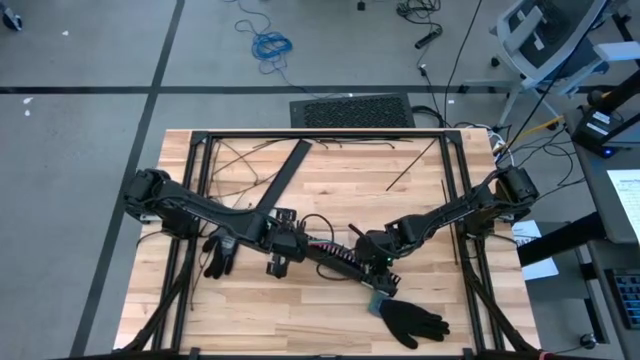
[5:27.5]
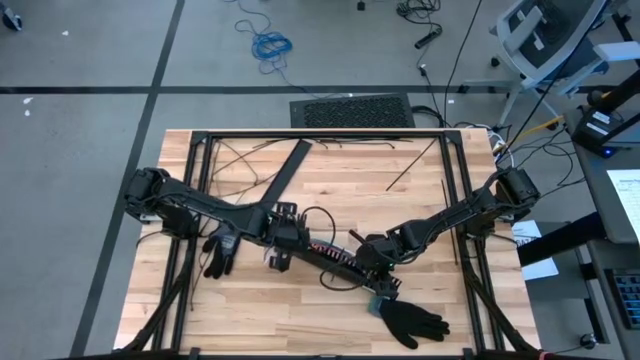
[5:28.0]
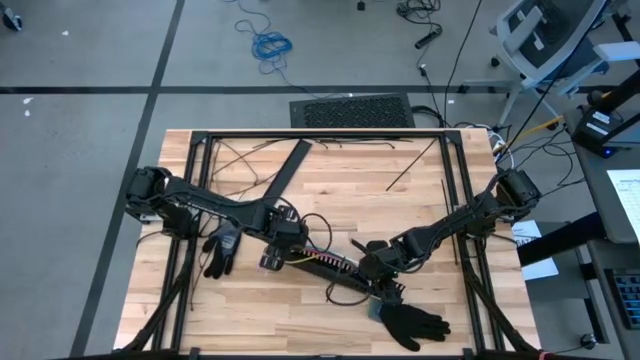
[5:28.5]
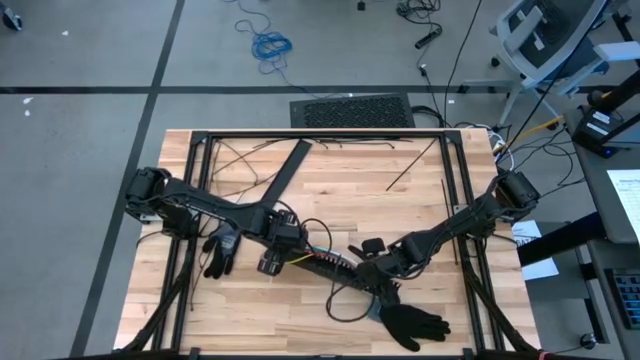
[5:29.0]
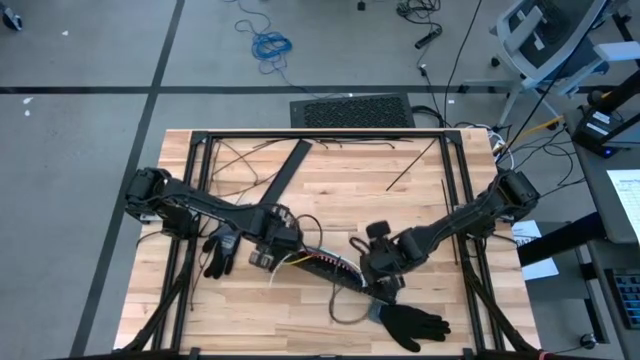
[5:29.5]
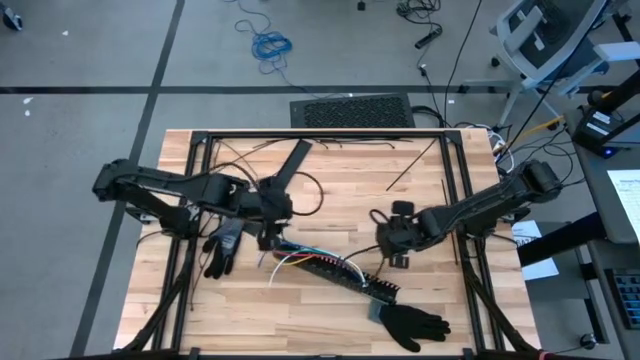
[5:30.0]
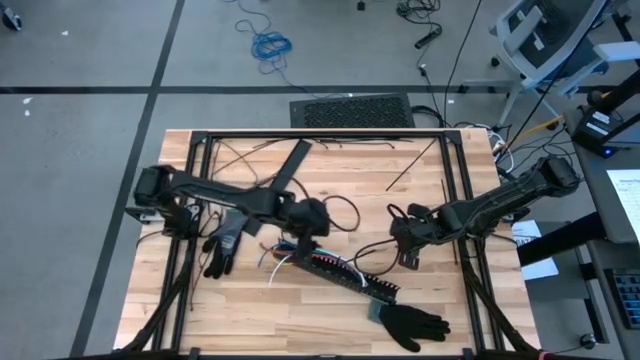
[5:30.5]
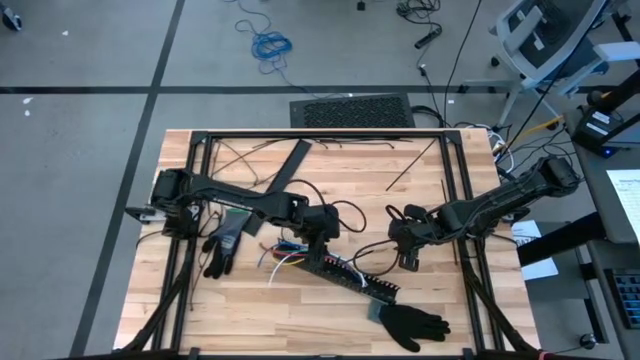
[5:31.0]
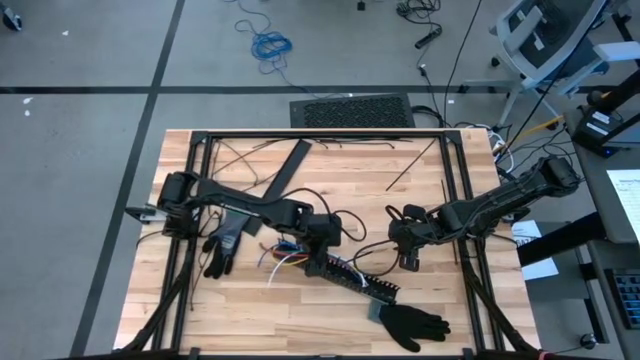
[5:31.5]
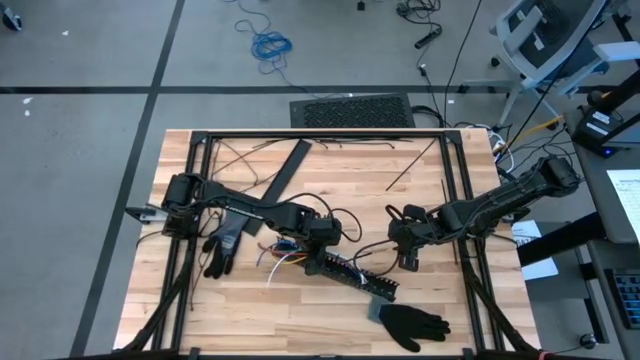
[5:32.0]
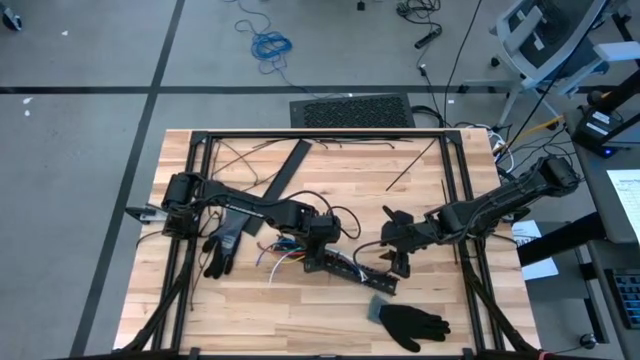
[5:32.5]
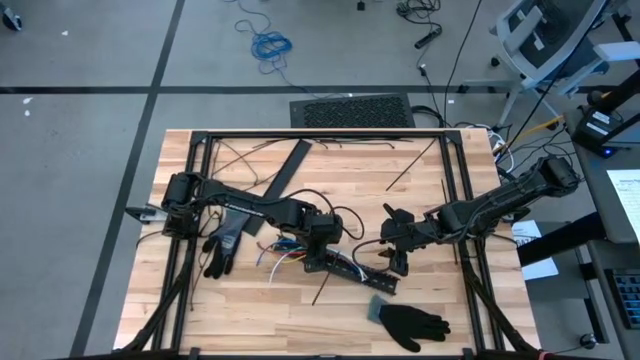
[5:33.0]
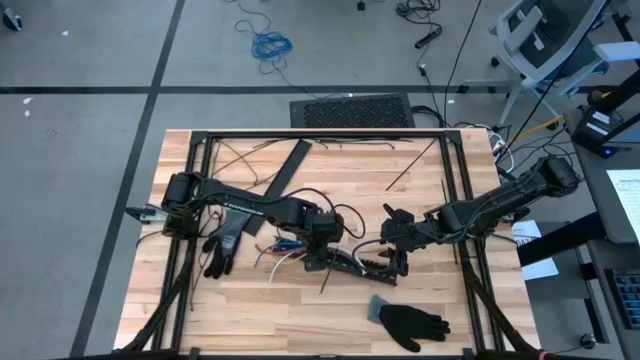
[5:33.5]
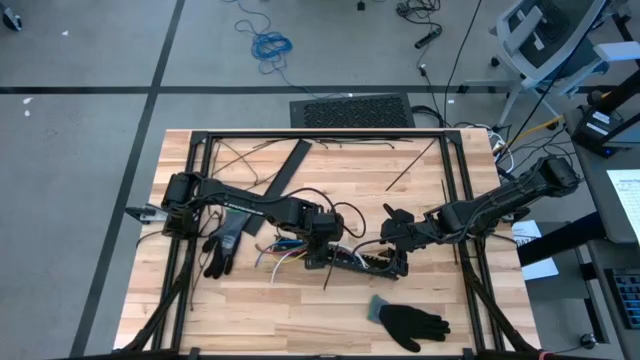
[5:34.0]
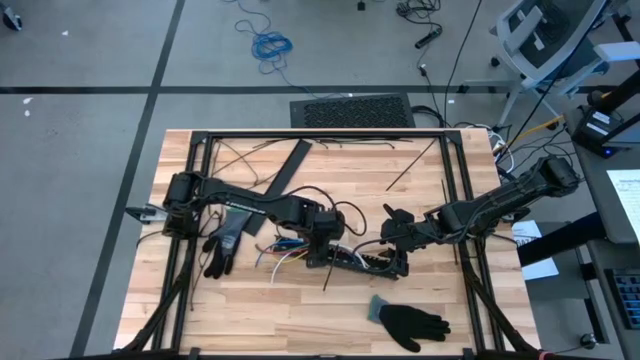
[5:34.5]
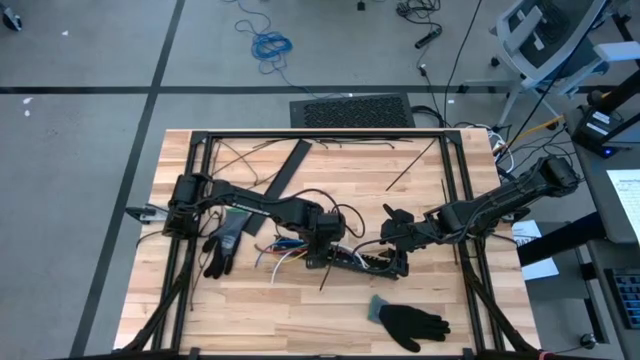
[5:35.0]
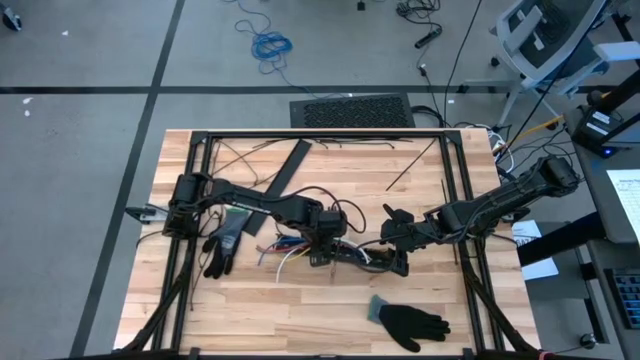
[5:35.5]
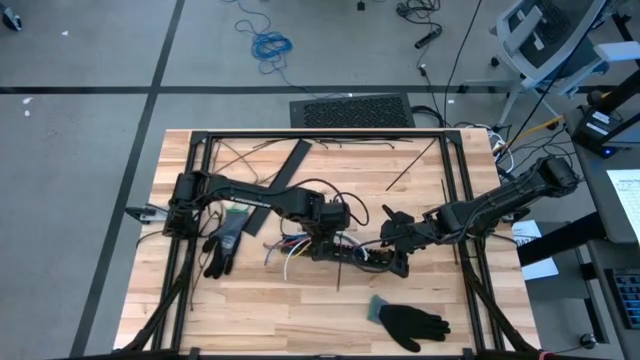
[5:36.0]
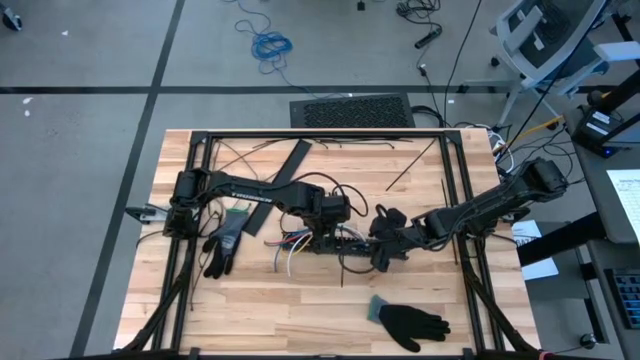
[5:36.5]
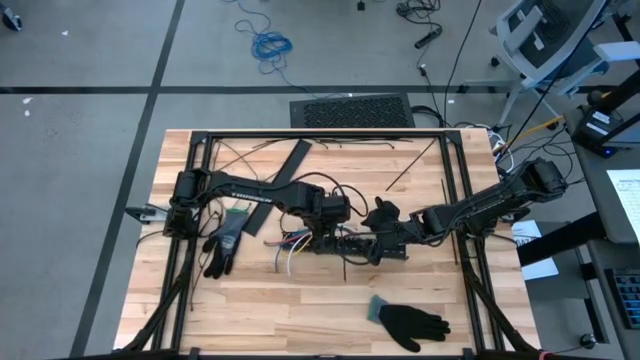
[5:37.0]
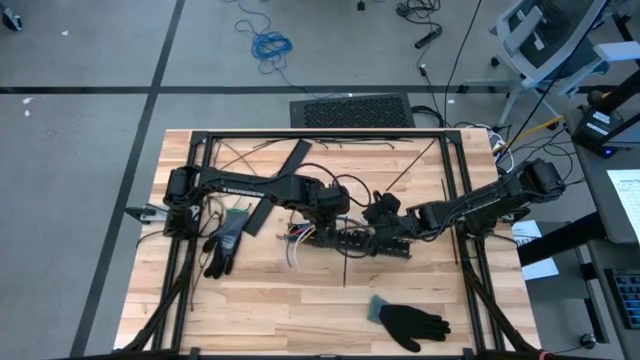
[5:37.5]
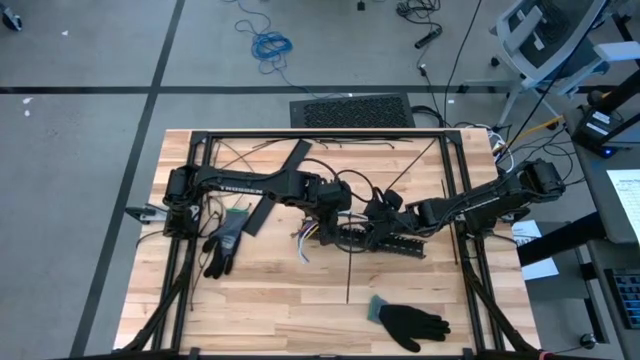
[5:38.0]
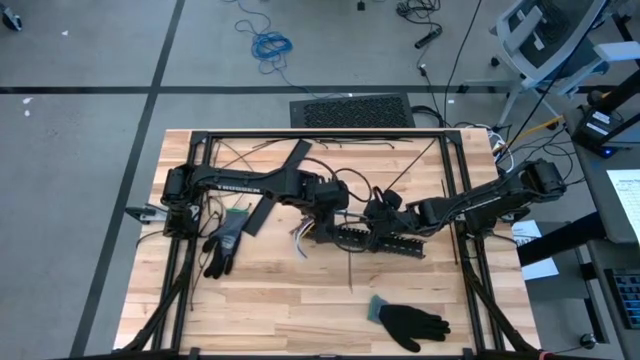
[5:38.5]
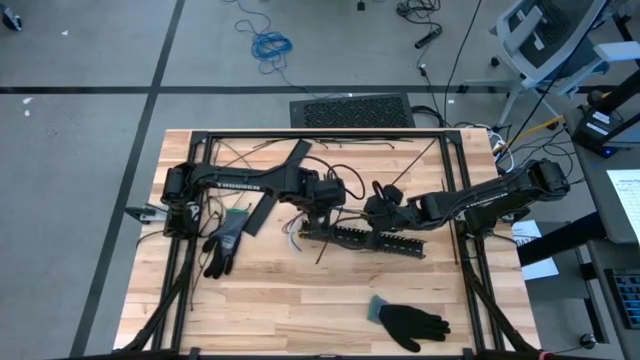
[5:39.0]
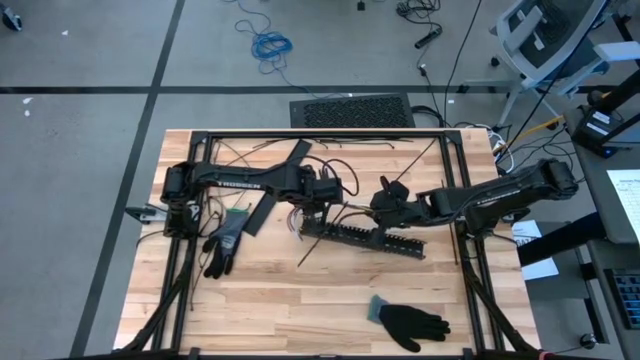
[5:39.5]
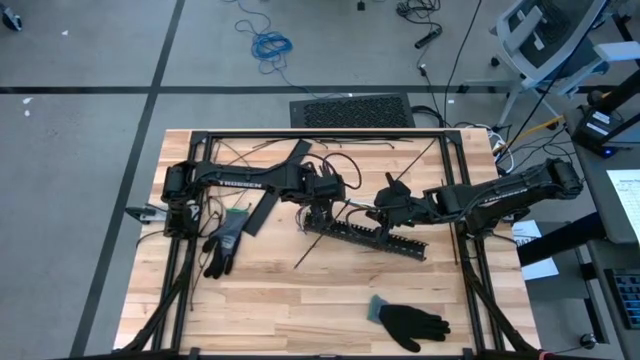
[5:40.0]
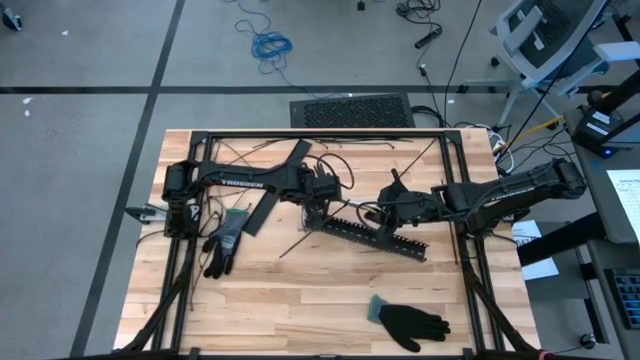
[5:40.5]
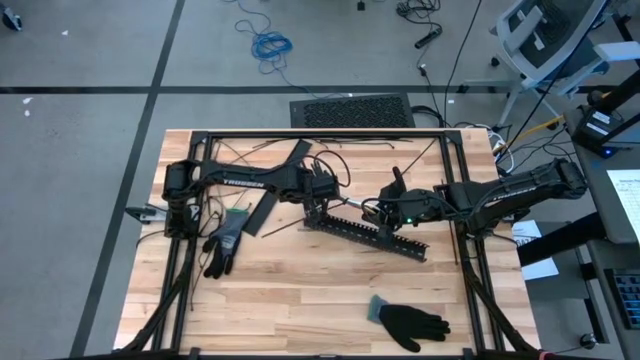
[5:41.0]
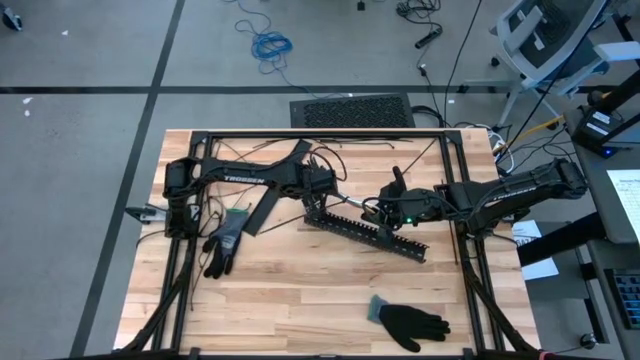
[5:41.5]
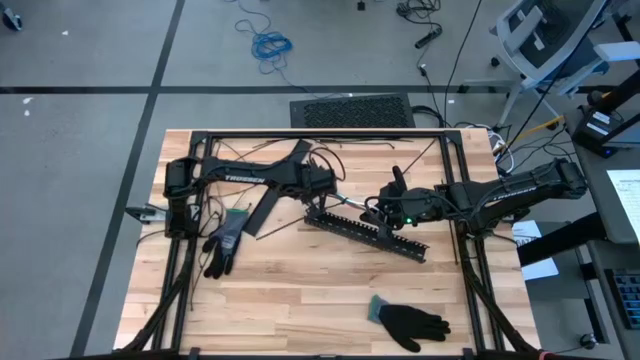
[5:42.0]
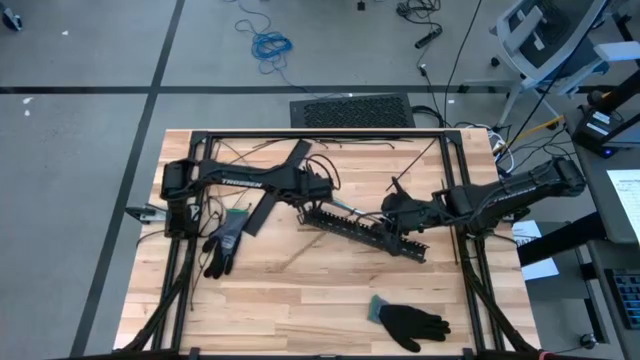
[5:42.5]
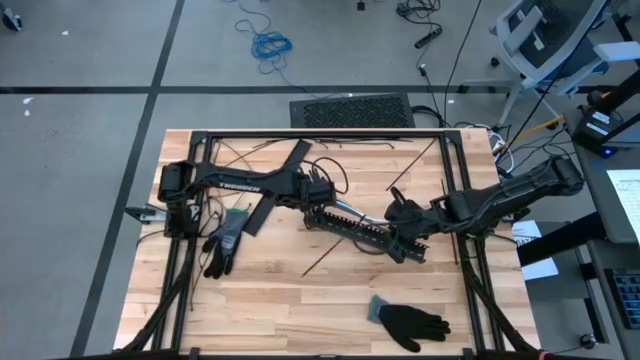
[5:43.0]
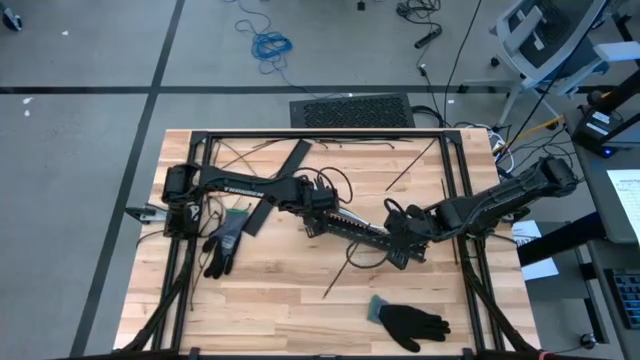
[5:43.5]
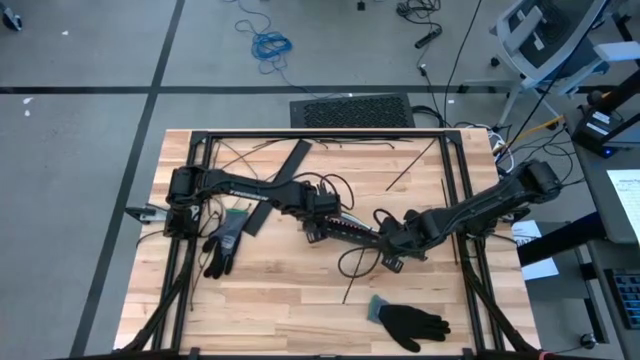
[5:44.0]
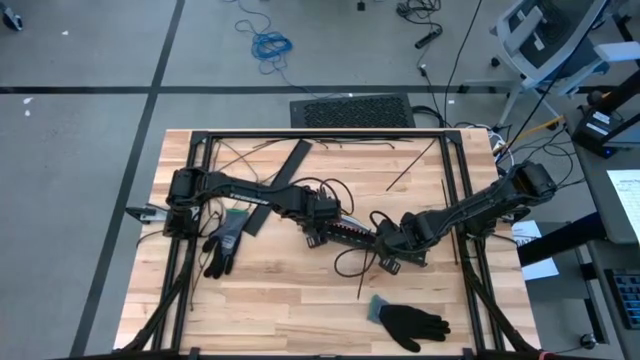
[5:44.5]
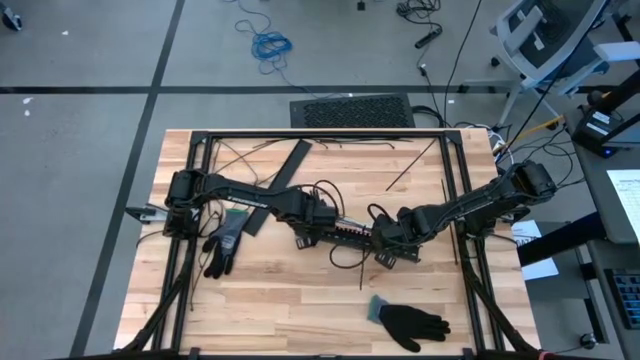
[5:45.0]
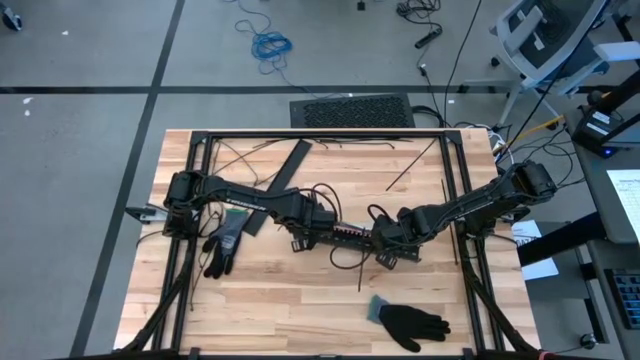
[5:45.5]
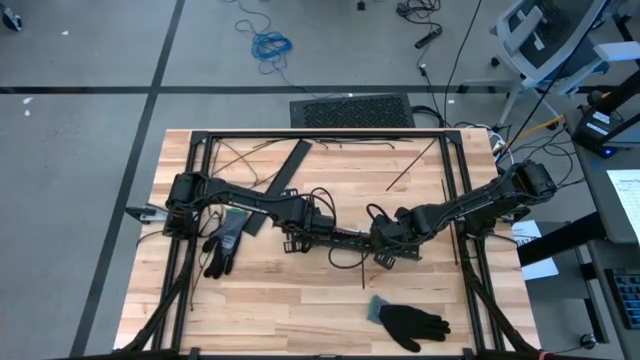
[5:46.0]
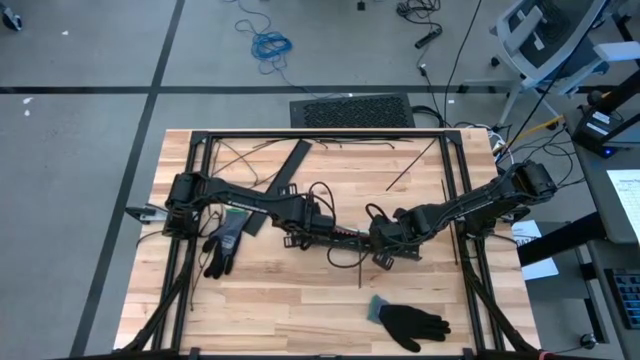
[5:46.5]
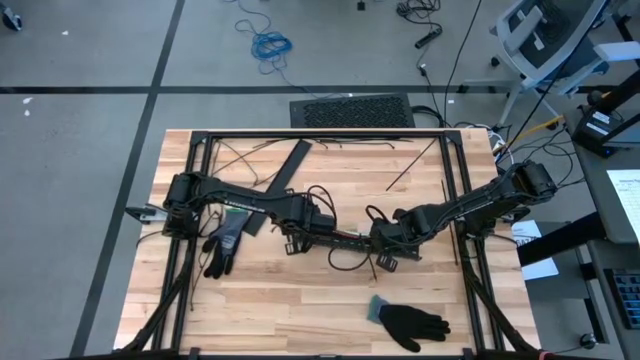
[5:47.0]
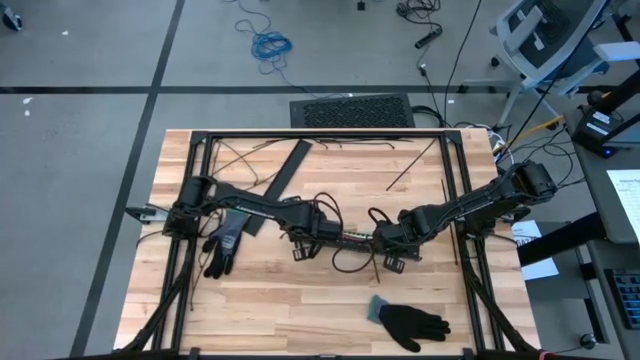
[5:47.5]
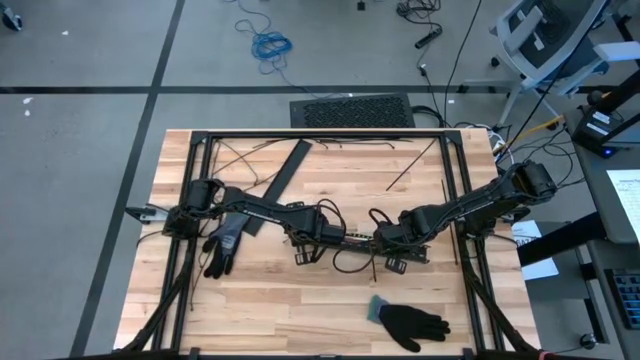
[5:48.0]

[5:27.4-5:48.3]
Task: Ziptie cables
Put the ziptied cable wires into the cable duct
